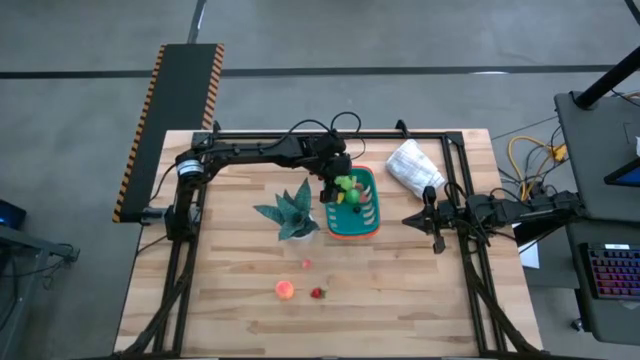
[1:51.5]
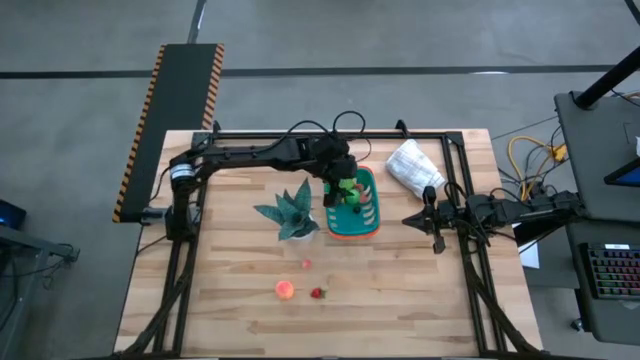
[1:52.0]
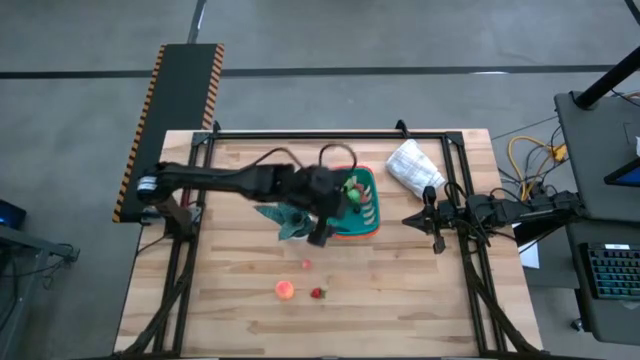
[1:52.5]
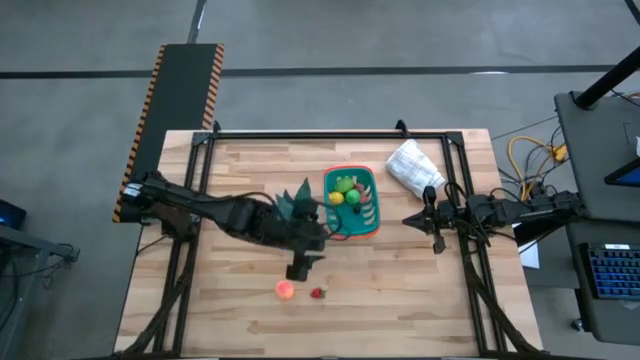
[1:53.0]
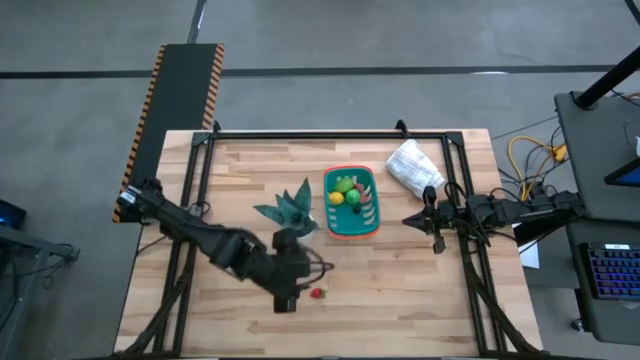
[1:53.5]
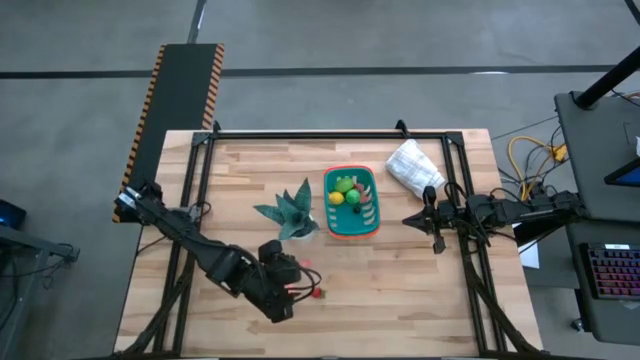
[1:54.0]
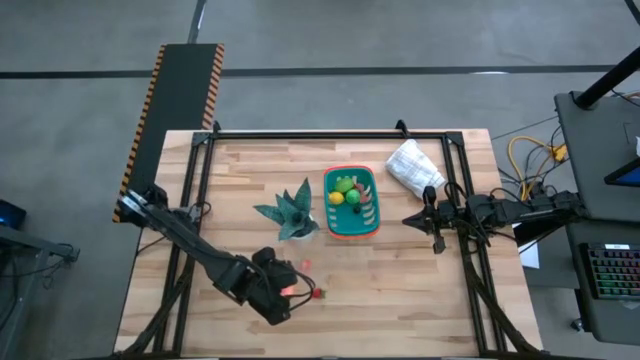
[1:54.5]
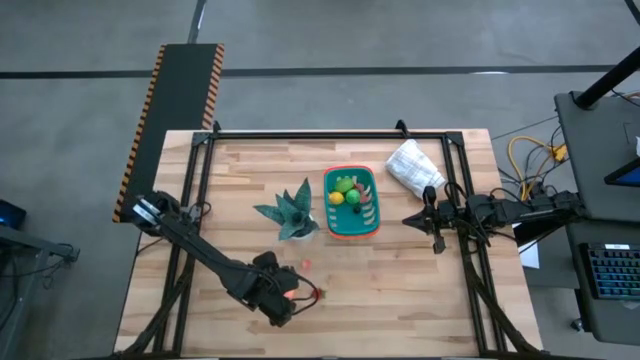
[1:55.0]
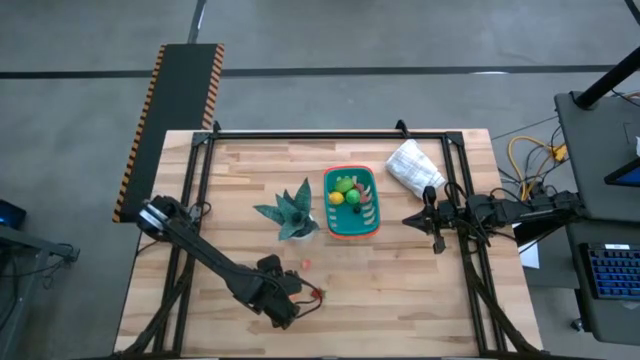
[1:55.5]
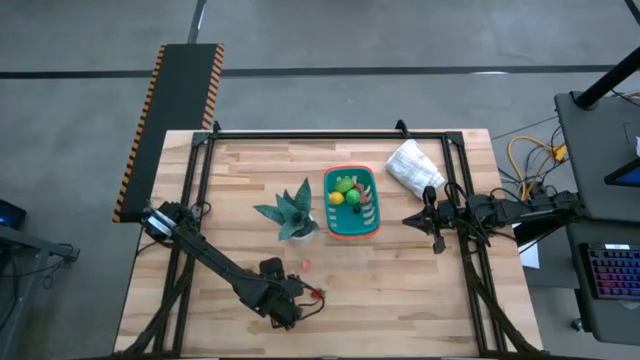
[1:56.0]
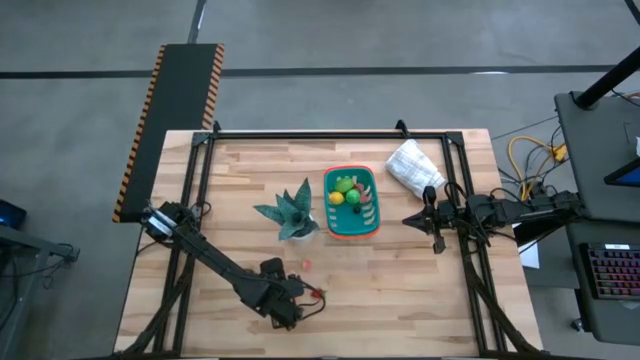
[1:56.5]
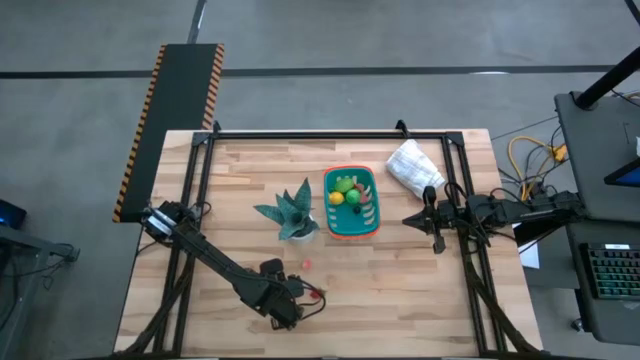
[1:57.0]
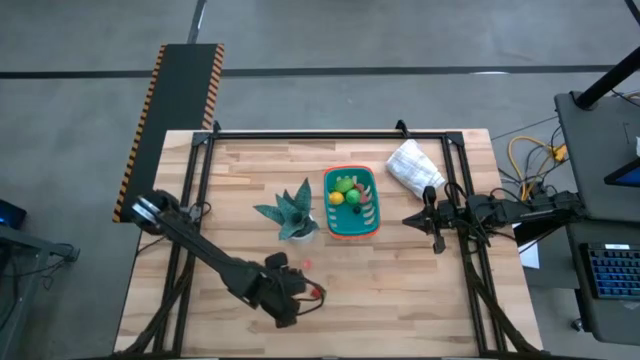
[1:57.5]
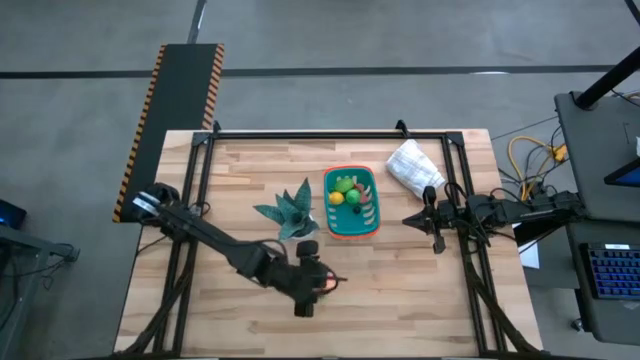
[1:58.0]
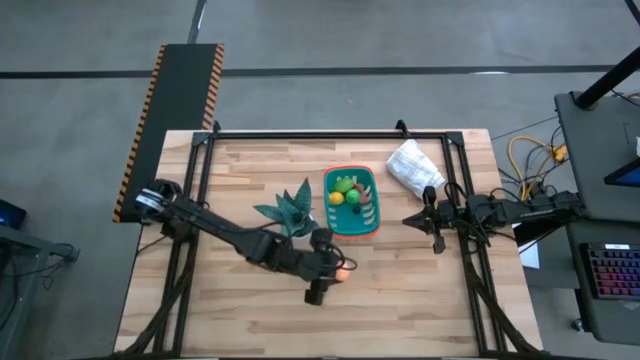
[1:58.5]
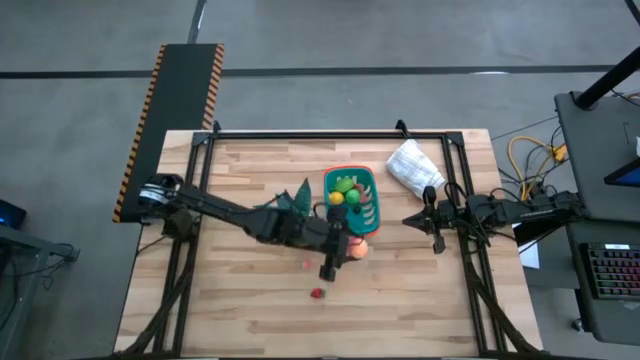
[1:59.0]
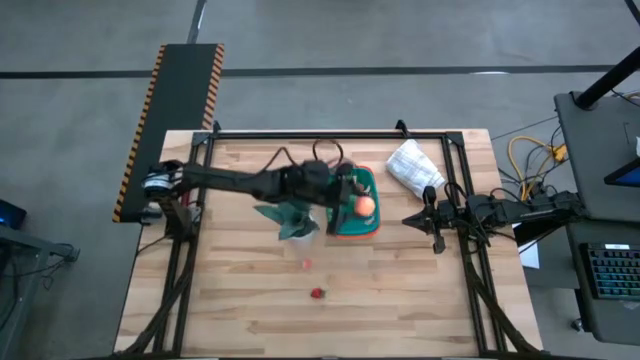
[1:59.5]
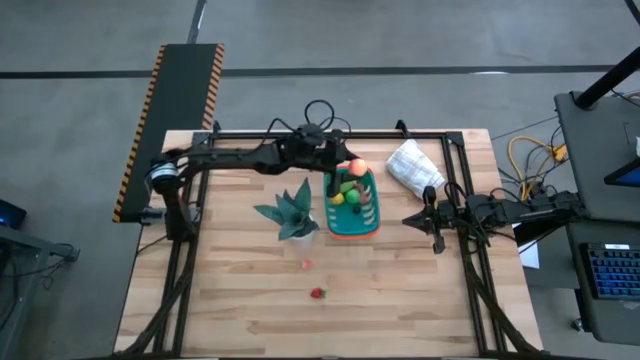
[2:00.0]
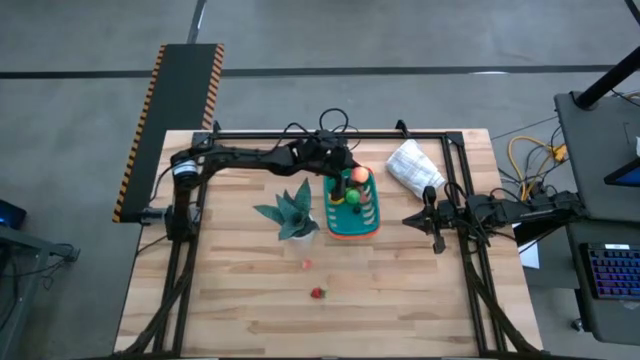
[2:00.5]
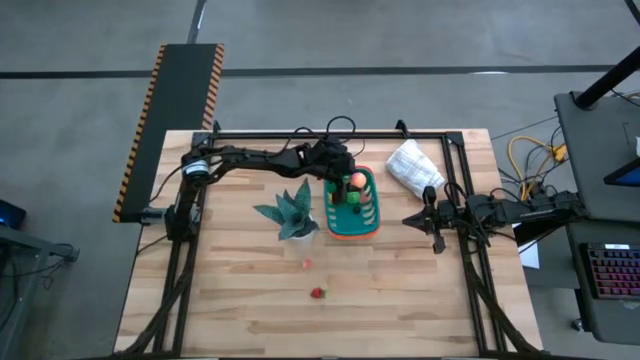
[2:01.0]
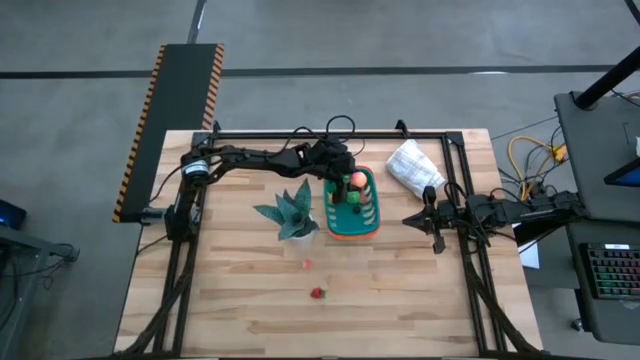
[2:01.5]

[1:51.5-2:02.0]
Task: Build produce basket
Put the bottom peach into the basket

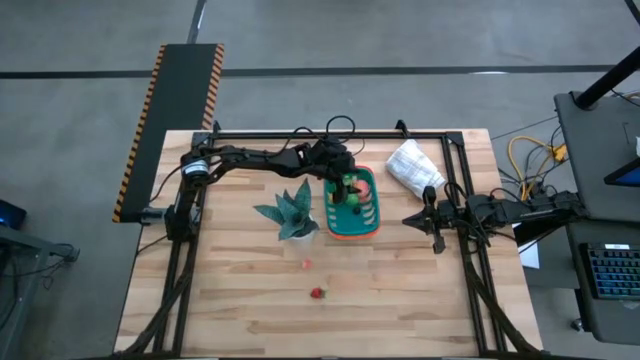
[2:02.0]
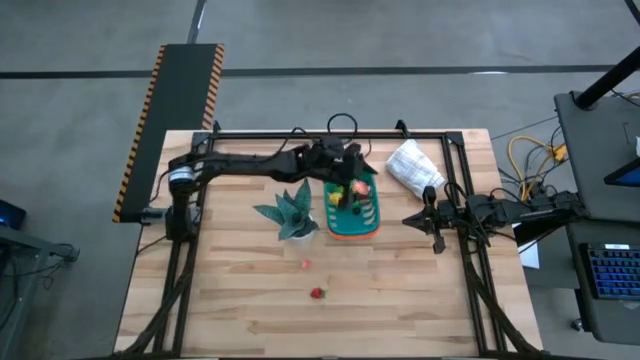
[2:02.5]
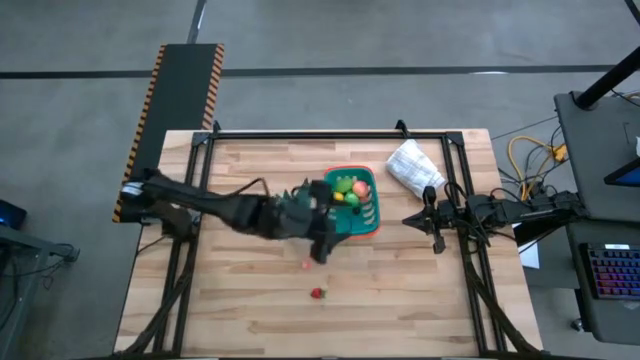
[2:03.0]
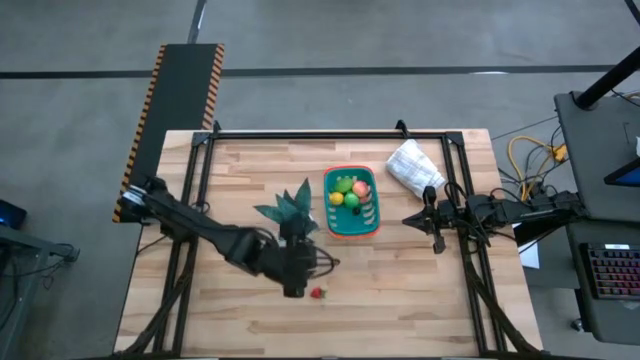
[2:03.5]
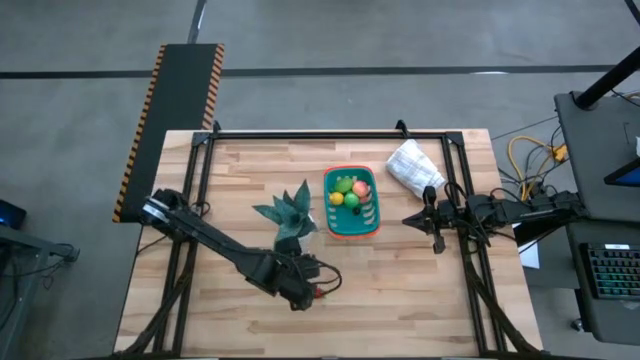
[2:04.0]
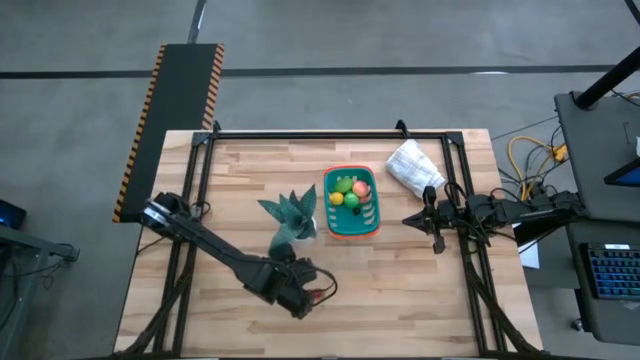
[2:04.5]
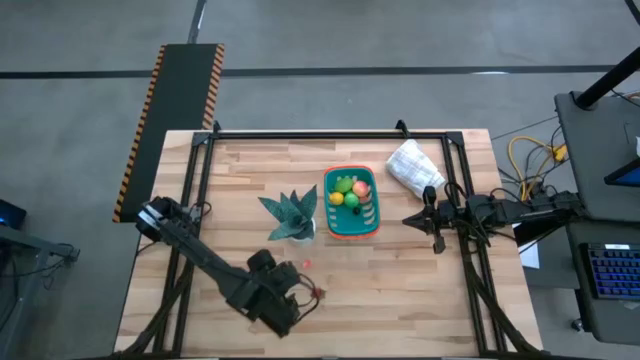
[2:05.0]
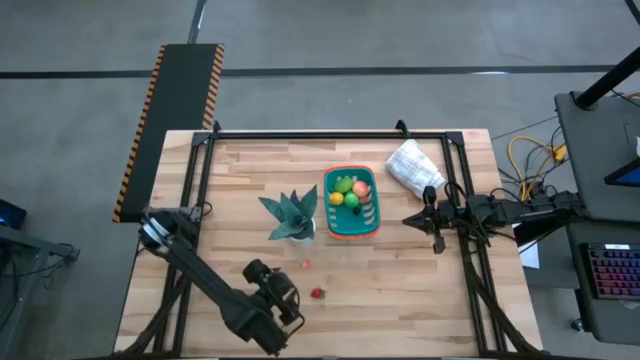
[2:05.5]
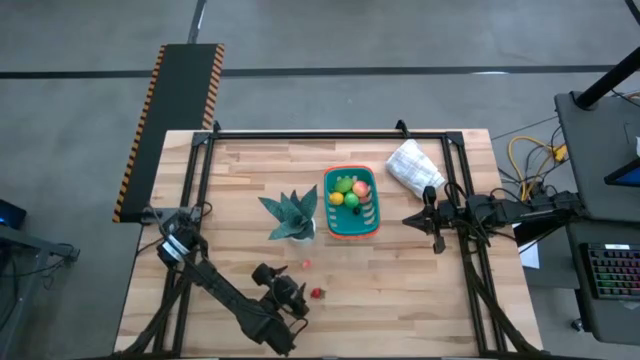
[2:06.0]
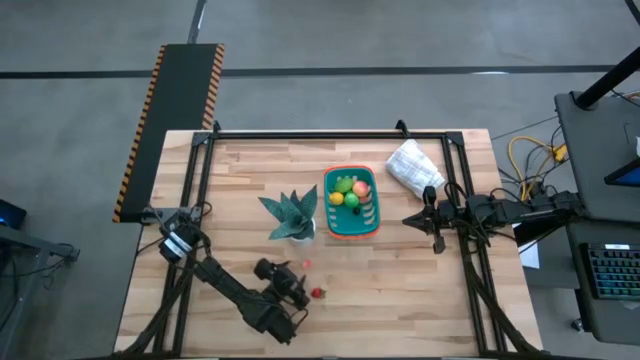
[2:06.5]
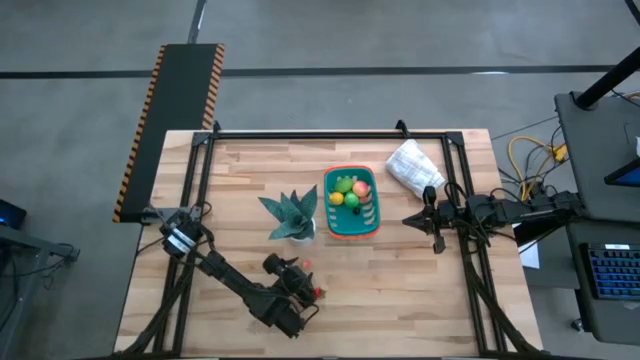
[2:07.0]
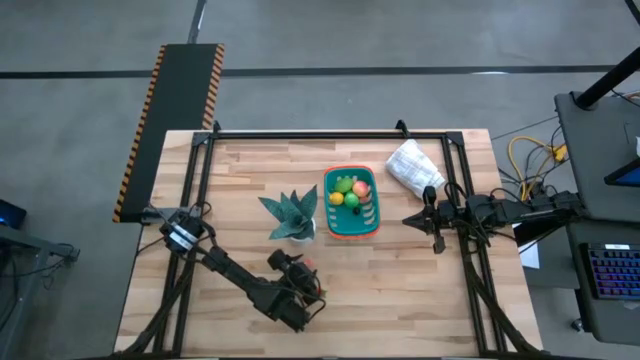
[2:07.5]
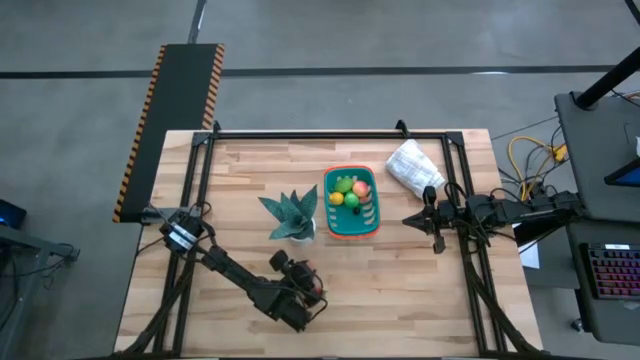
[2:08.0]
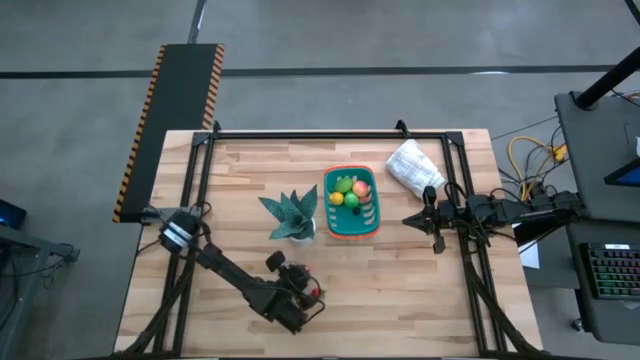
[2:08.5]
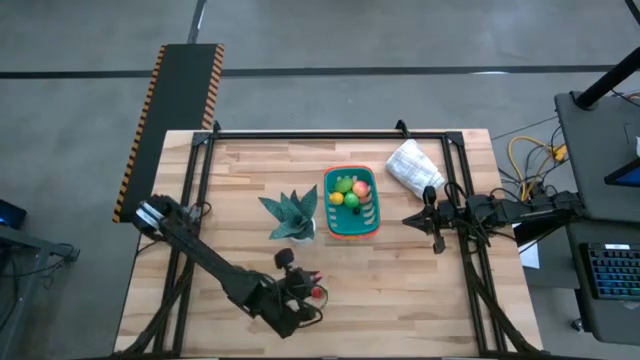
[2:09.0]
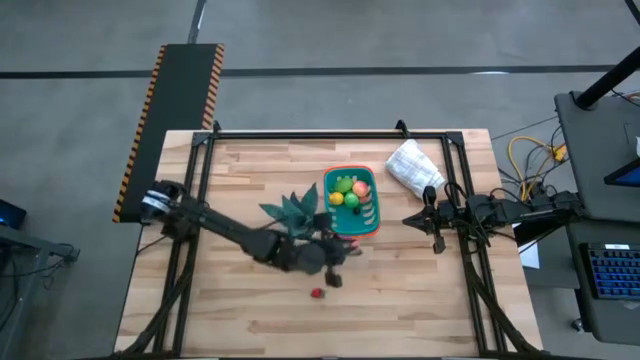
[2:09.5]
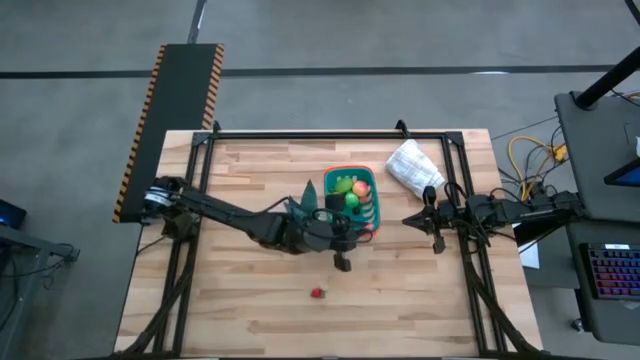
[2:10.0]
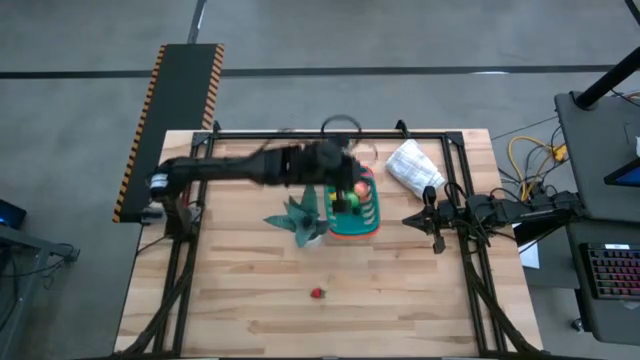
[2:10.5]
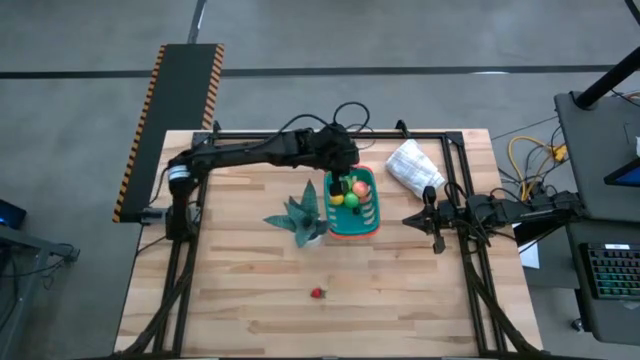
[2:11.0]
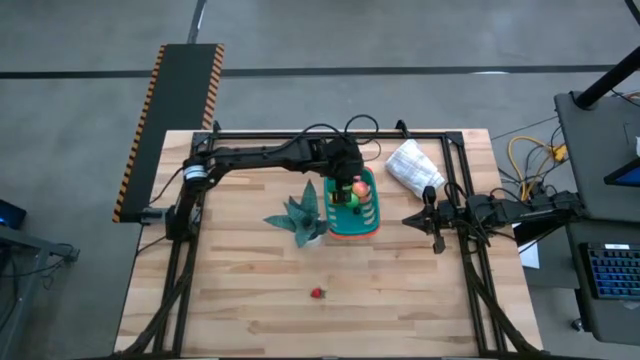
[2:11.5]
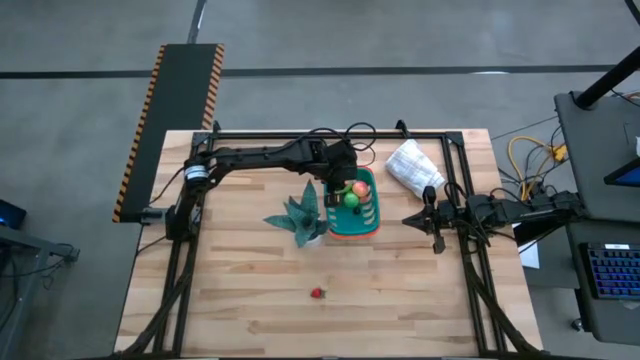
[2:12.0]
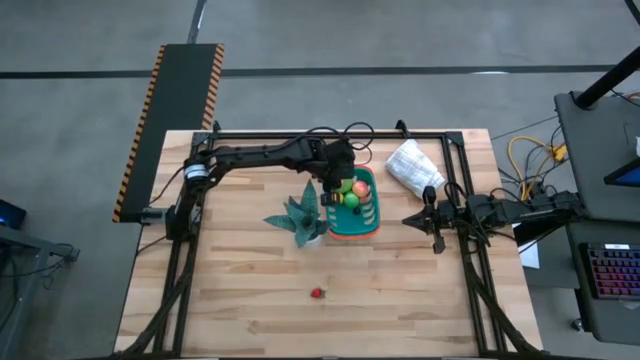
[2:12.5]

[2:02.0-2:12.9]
Put the peach into the basket

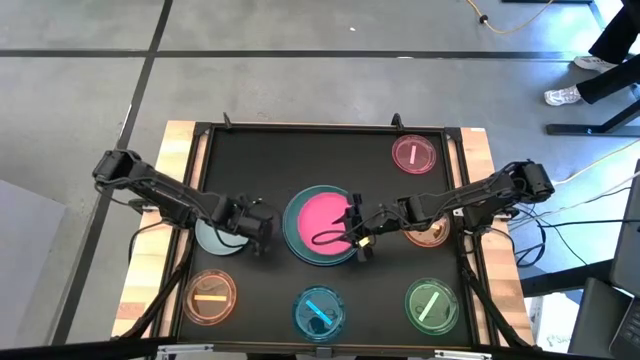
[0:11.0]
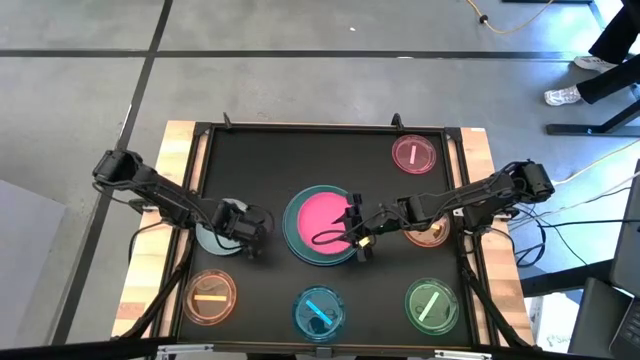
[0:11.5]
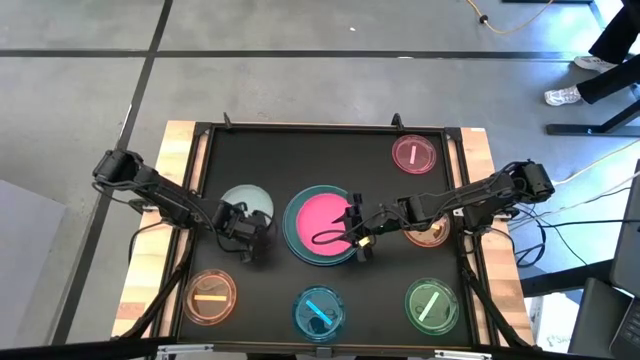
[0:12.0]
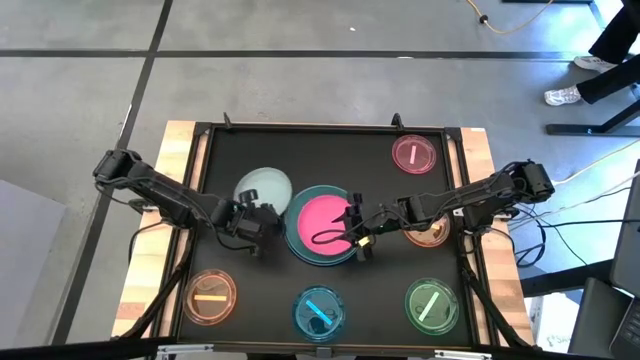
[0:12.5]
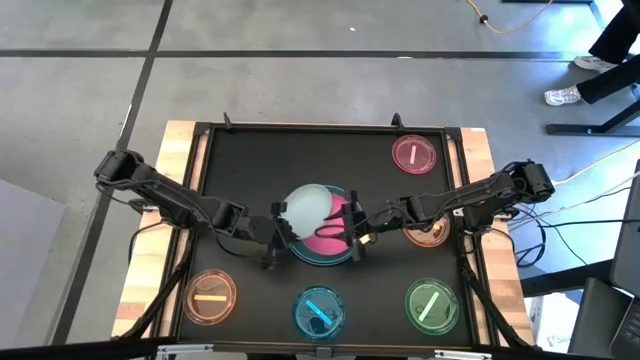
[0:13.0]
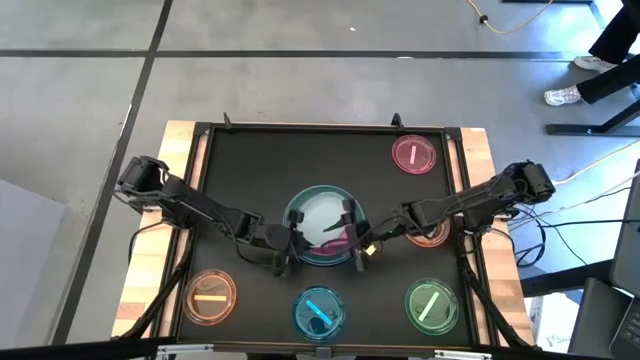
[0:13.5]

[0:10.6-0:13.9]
Task: Stack plastic plates
Stack the gray plate on top of the pink plate
